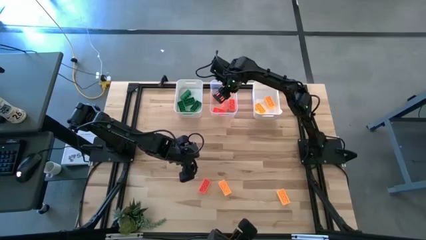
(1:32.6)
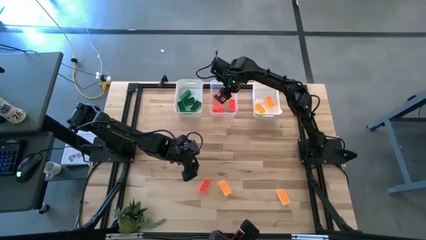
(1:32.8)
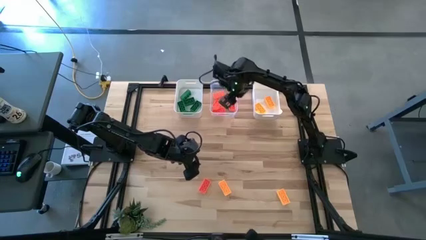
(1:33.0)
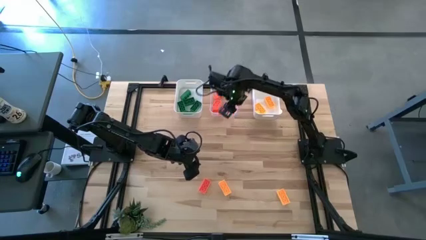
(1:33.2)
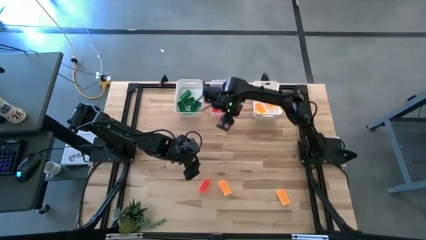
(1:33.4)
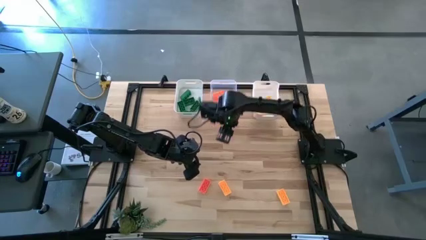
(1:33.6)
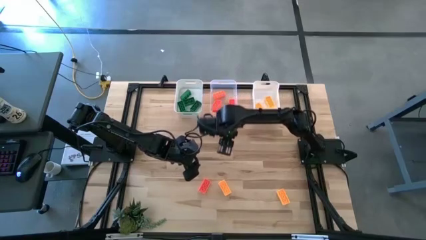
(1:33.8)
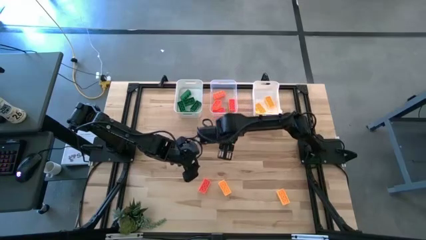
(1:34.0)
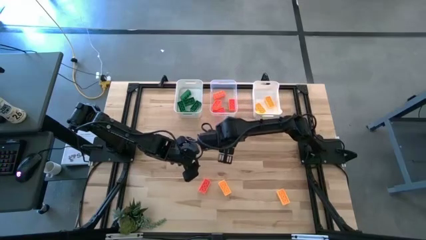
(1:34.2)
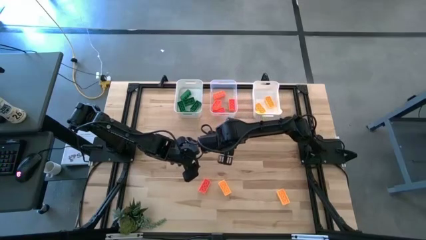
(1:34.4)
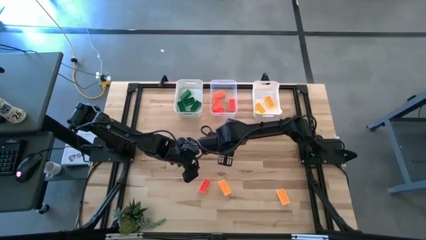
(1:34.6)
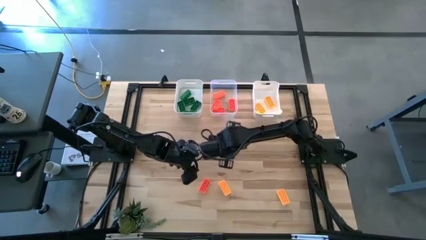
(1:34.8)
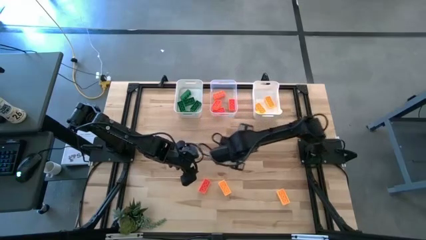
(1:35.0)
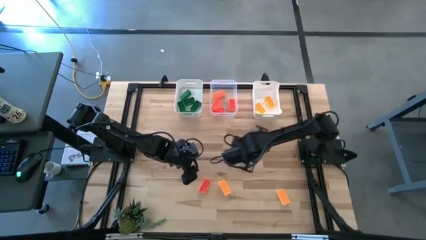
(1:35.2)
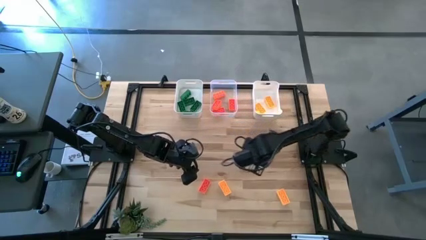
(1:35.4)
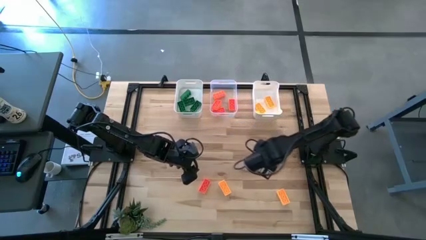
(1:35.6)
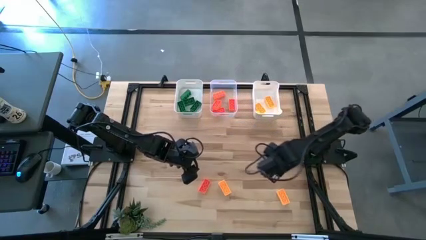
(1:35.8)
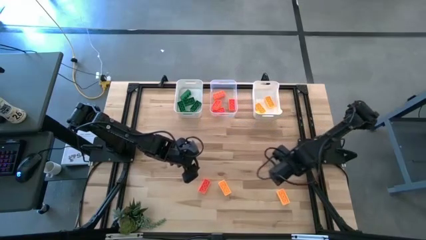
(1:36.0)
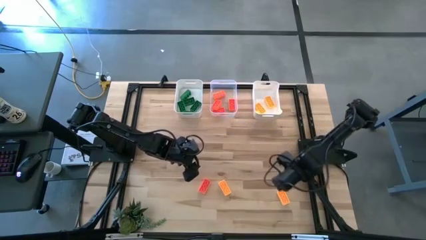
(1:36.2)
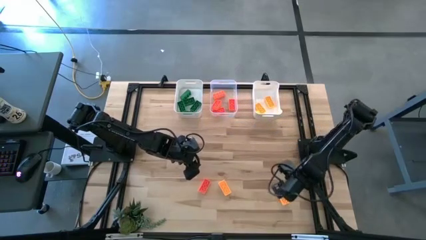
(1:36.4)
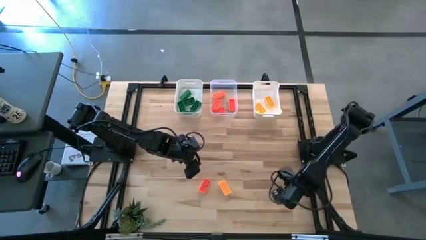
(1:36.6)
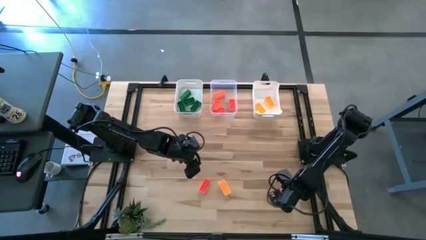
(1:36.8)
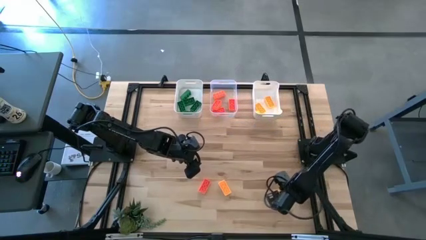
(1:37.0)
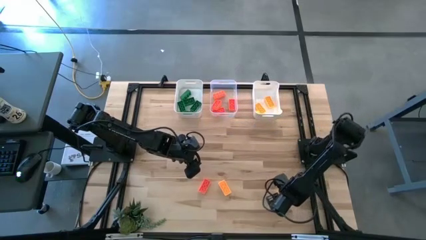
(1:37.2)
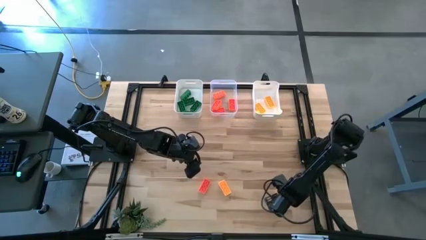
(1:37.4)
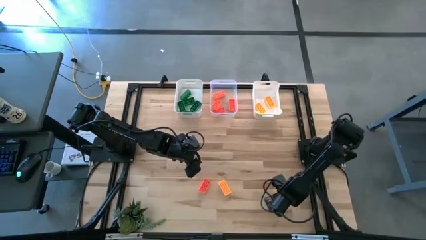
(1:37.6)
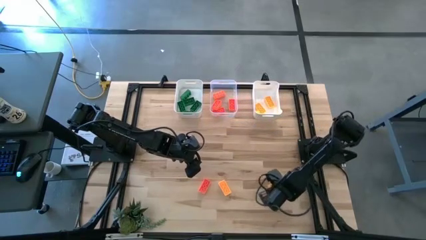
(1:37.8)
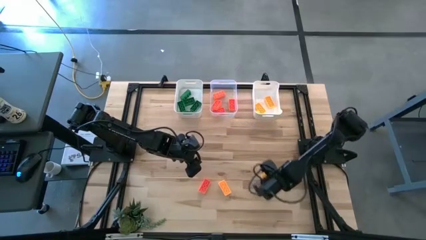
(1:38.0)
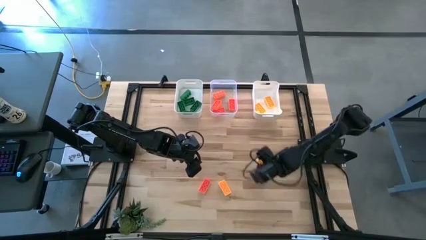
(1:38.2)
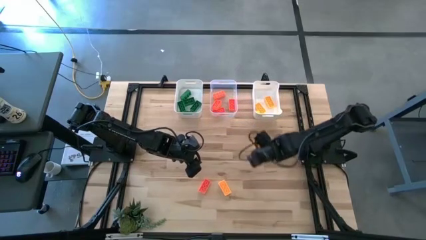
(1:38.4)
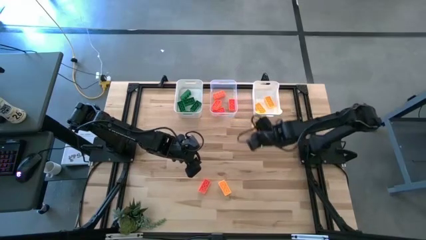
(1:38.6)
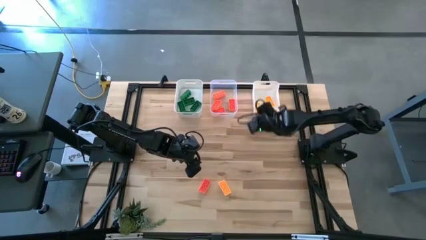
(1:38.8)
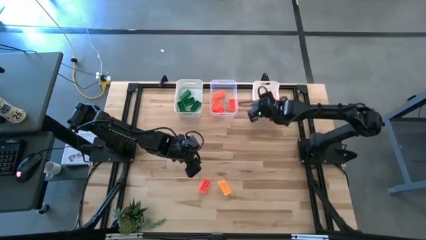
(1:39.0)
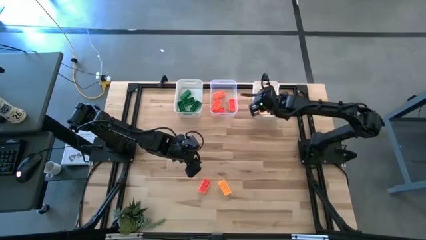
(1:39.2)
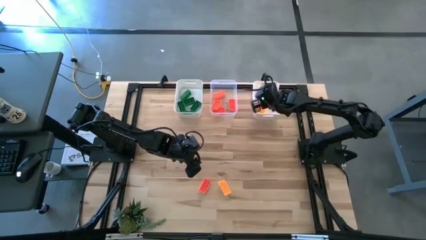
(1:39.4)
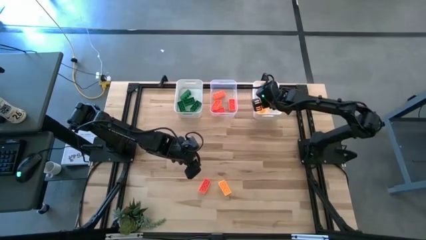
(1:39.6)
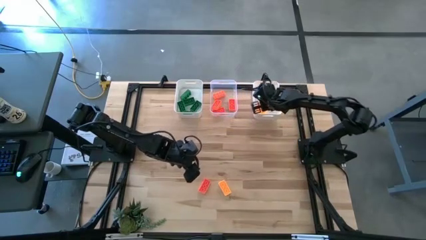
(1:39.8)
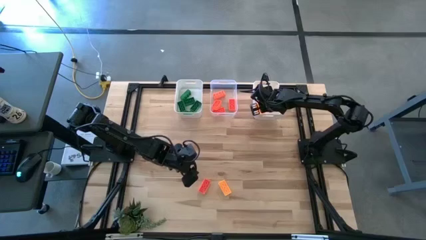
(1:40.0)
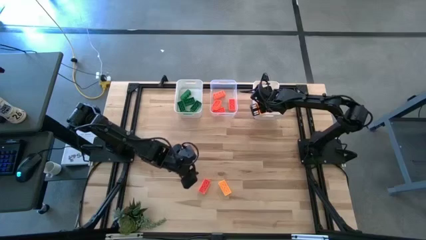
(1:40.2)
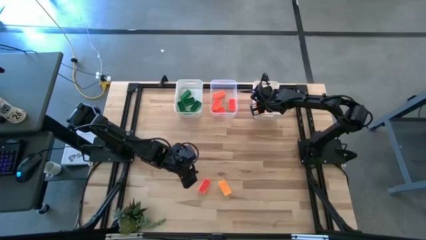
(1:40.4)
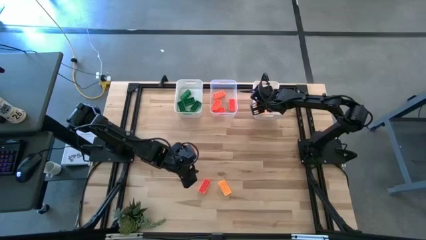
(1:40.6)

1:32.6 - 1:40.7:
Task: Sort & place blocks by color
Put the yellow game piece into the right white bin

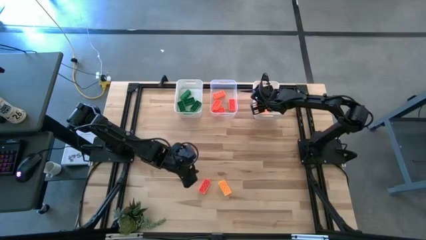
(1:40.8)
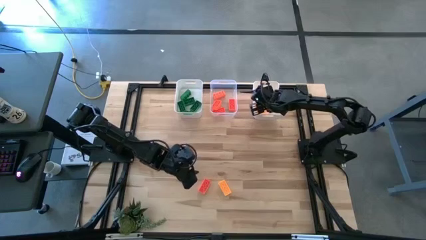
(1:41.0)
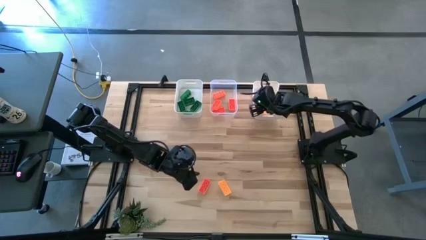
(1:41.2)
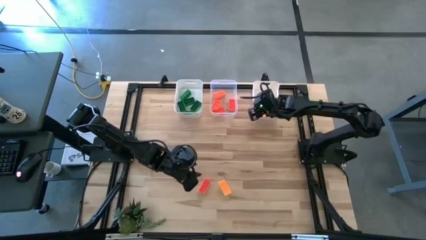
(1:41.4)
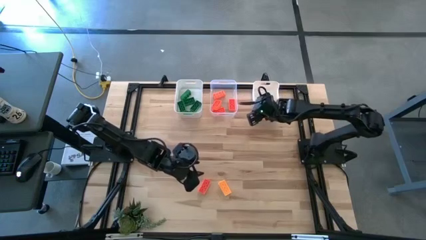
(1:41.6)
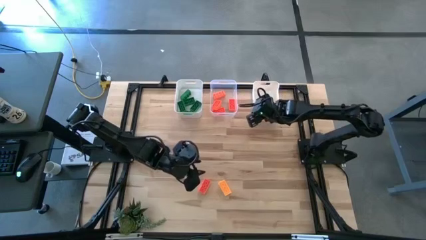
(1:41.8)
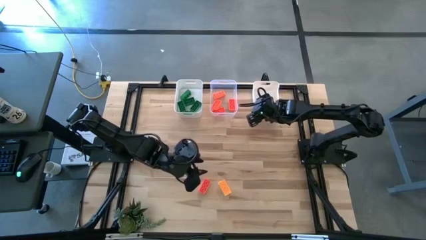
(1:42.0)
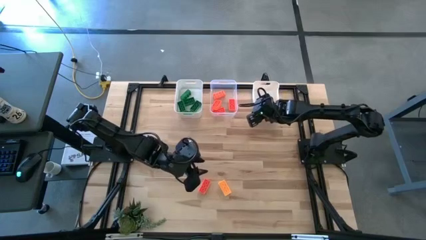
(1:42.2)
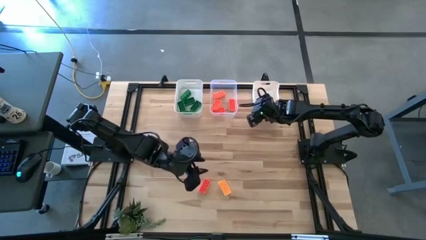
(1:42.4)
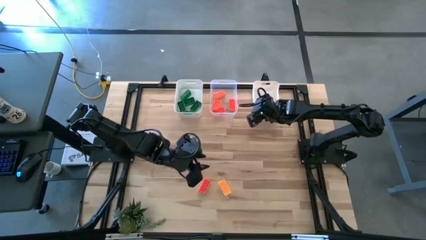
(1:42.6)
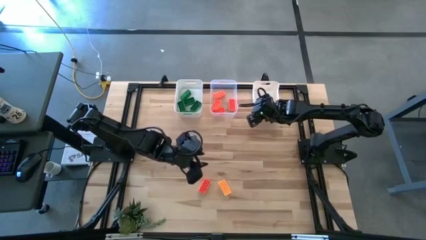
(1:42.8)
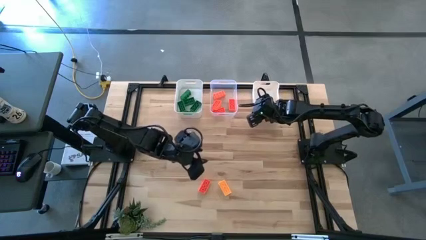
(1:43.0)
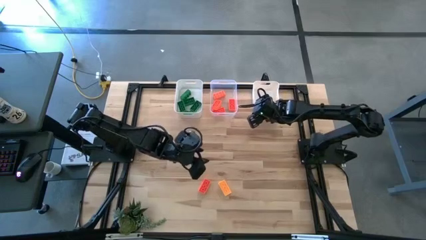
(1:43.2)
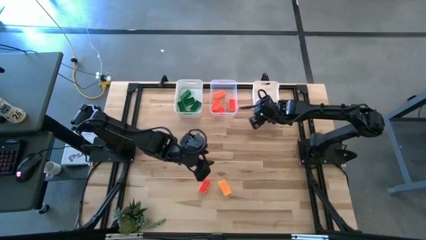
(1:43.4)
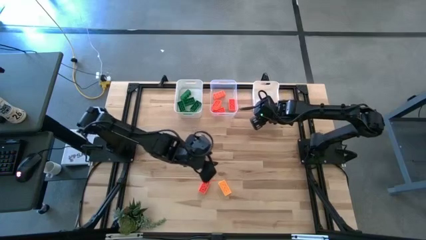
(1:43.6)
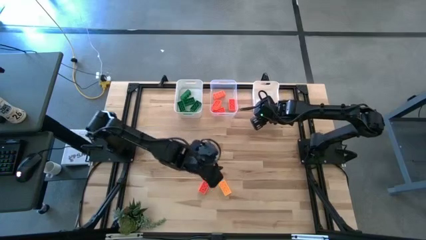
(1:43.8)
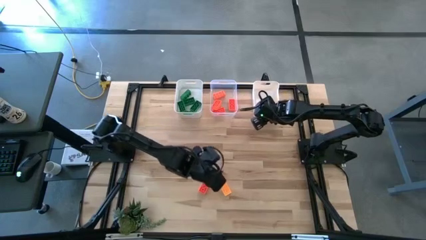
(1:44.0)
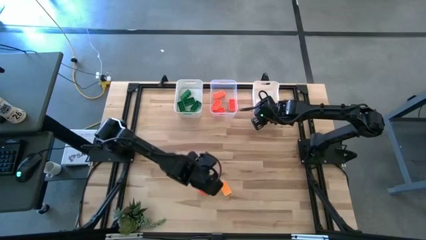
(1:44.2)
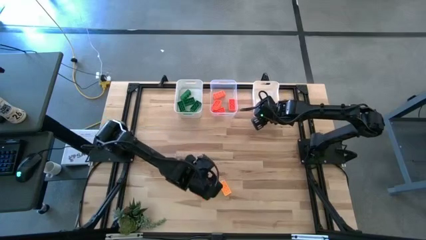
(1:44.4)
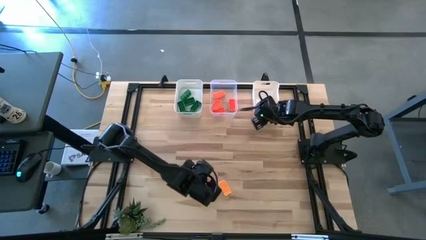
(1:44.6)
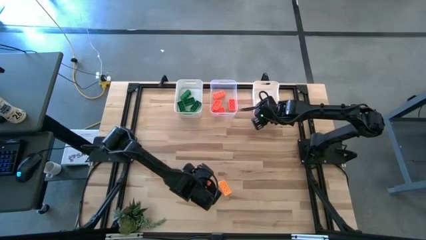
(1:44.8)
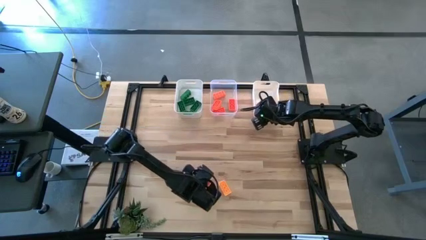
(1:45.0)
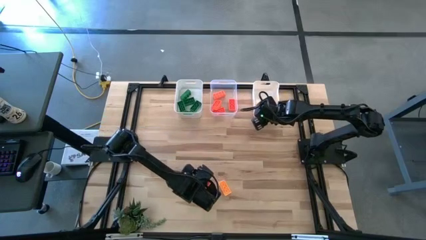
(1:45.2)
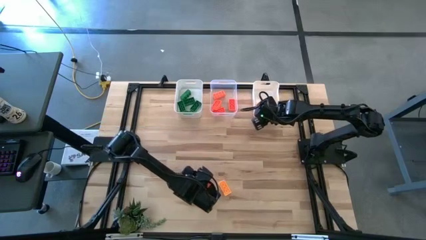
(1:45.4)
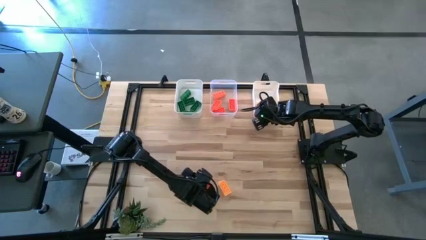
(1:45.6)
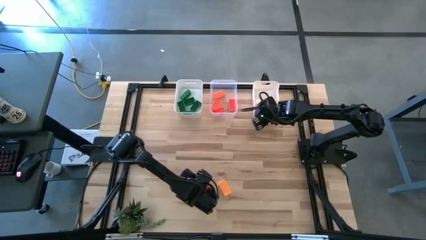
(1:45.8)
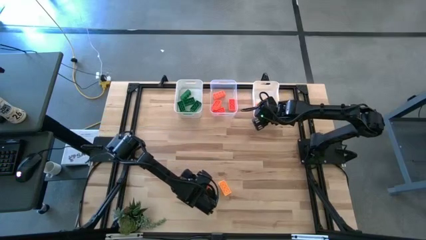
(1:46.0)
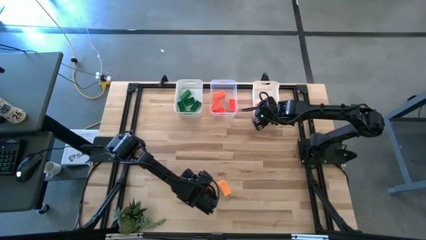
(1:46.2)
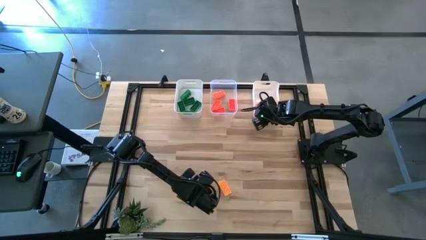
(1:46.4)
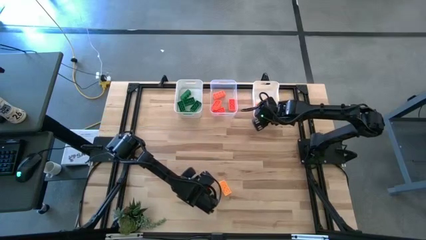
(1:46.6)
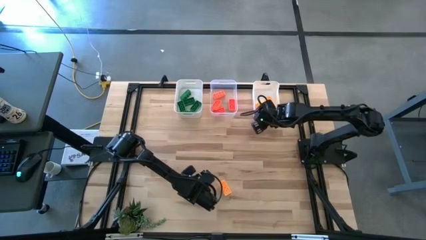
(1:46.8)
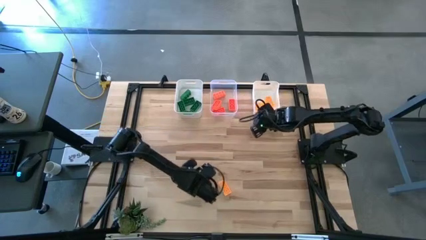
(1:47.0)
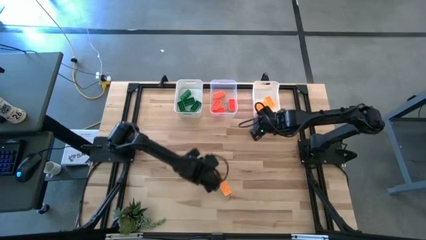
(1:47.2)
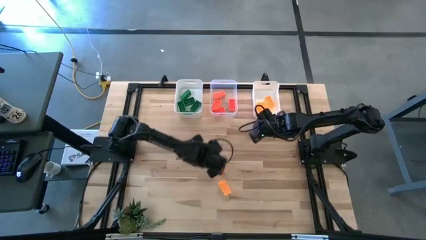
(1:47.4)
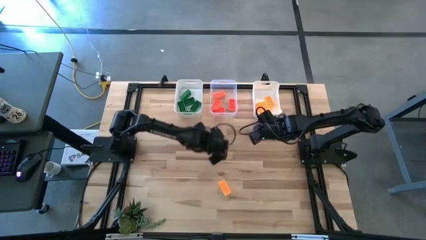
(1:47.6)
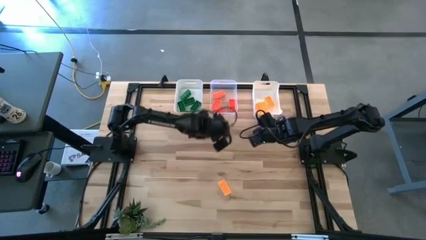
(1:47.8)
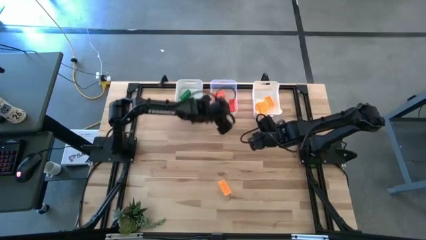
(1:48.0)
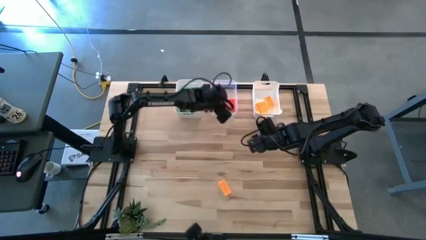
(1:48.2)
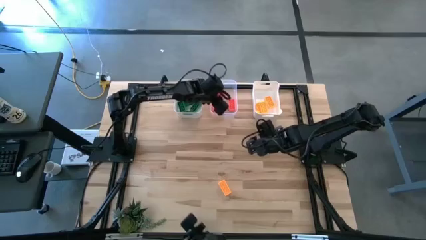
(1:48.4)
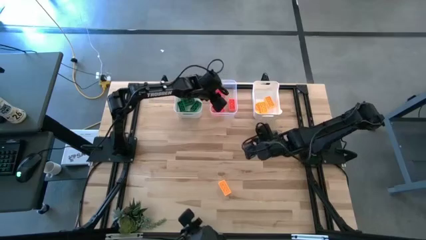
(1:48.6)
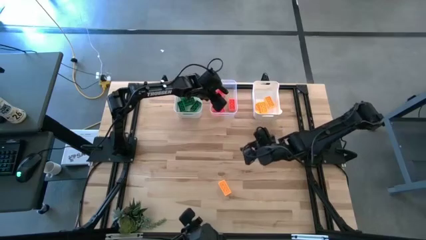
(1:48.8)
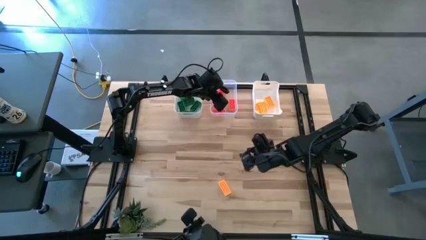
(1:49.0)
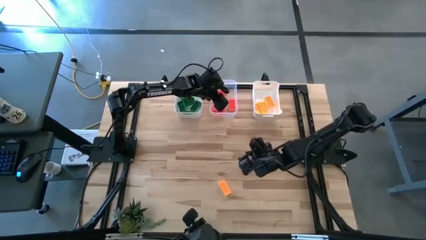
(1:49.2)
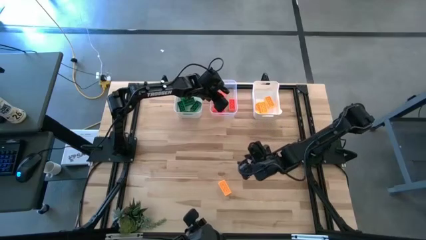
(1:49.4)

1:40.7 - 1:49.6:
Put the orange game piece into the transparent bin
